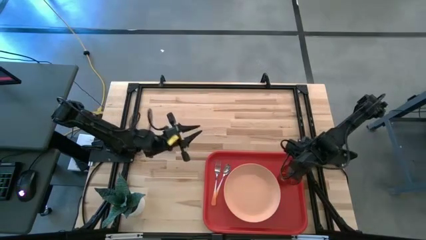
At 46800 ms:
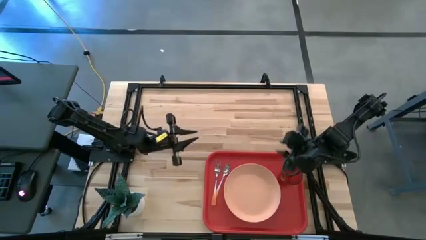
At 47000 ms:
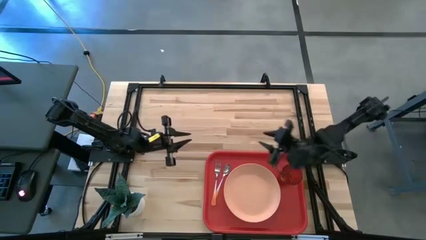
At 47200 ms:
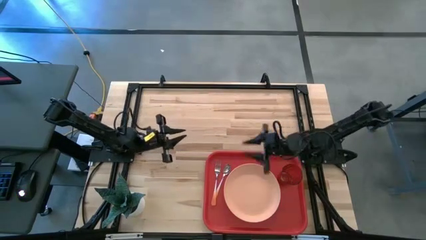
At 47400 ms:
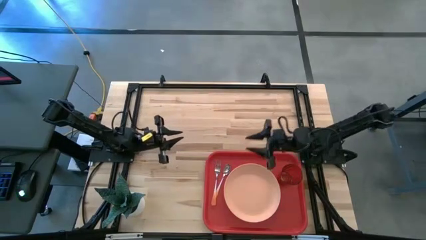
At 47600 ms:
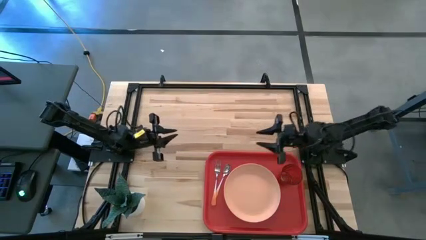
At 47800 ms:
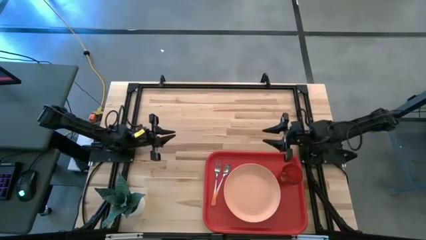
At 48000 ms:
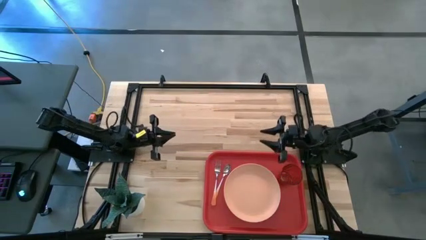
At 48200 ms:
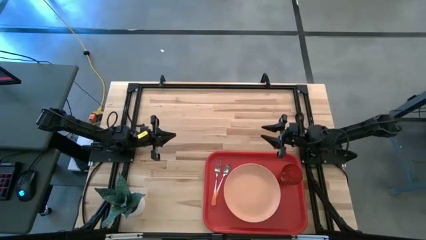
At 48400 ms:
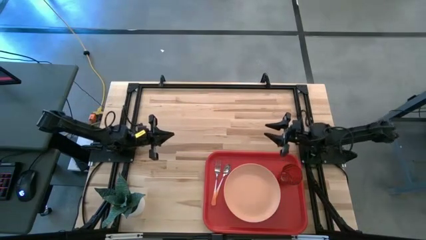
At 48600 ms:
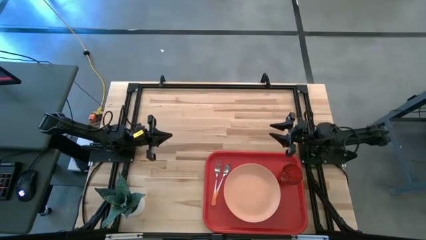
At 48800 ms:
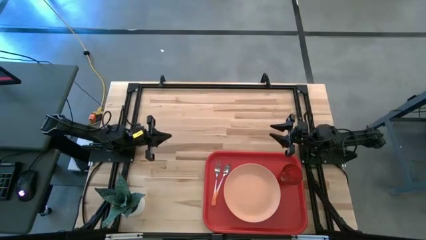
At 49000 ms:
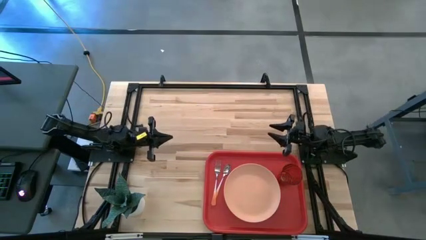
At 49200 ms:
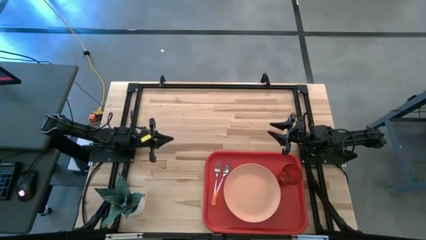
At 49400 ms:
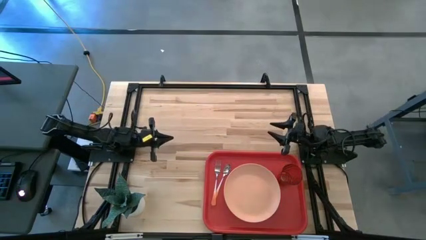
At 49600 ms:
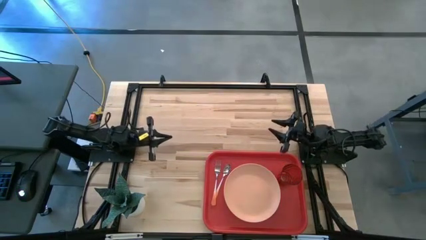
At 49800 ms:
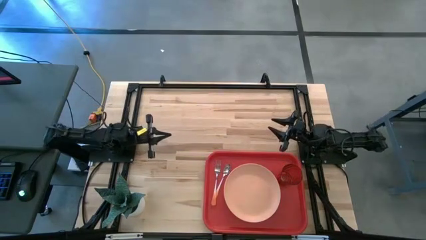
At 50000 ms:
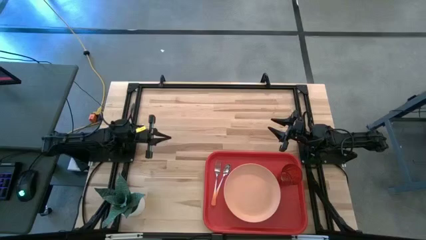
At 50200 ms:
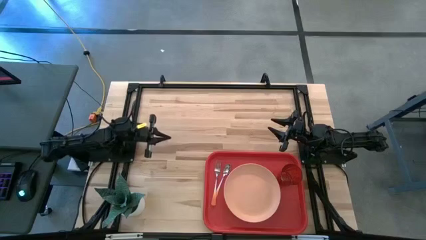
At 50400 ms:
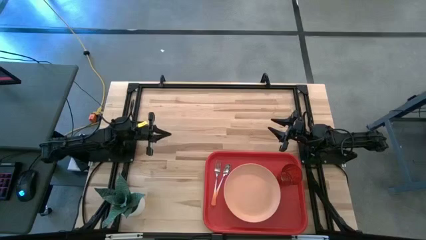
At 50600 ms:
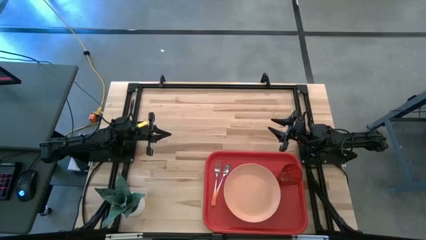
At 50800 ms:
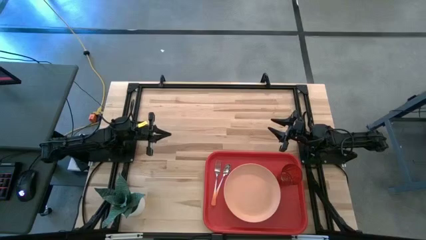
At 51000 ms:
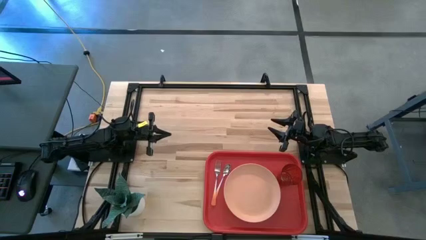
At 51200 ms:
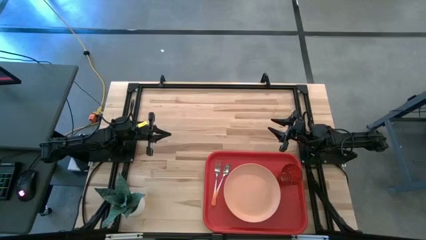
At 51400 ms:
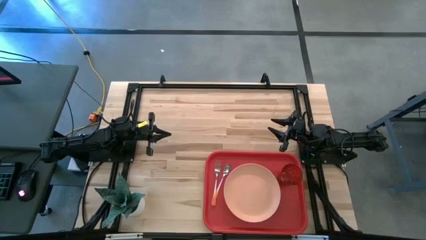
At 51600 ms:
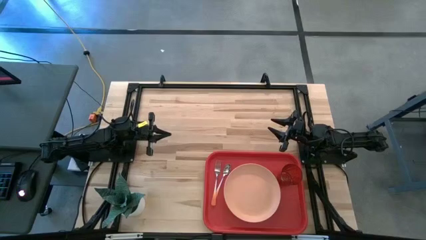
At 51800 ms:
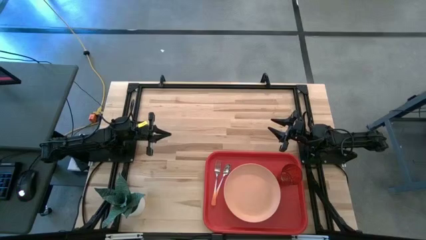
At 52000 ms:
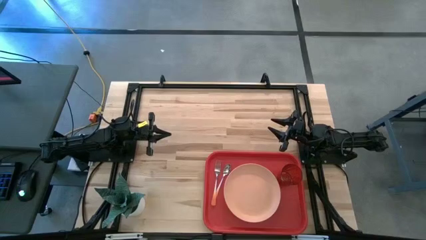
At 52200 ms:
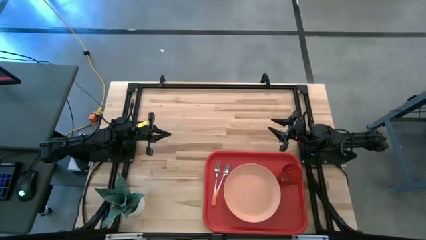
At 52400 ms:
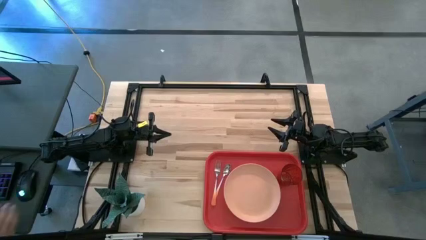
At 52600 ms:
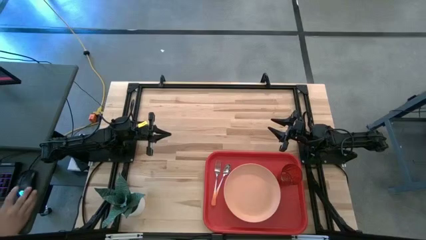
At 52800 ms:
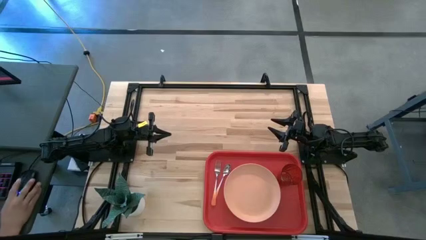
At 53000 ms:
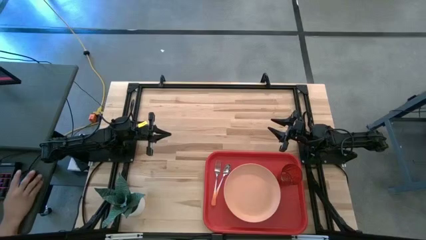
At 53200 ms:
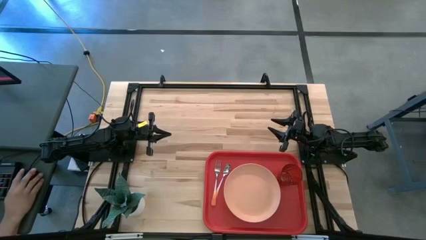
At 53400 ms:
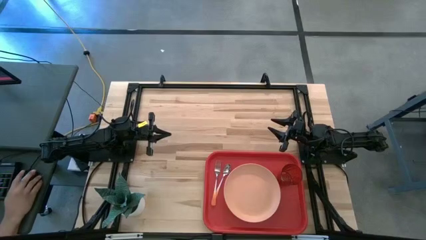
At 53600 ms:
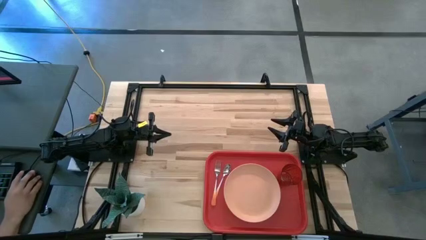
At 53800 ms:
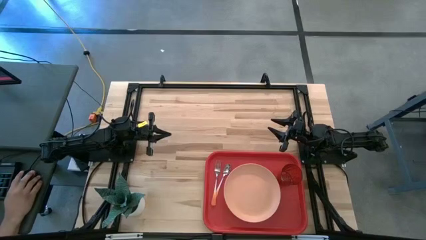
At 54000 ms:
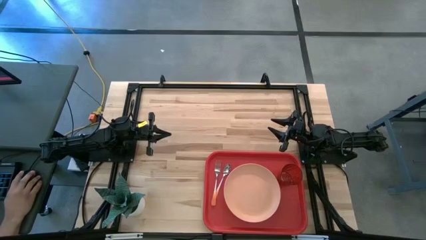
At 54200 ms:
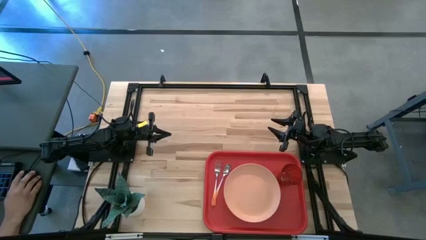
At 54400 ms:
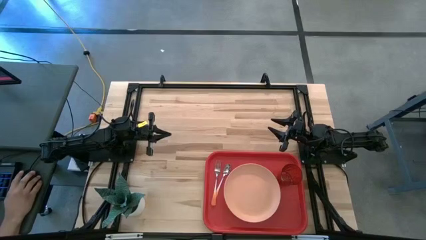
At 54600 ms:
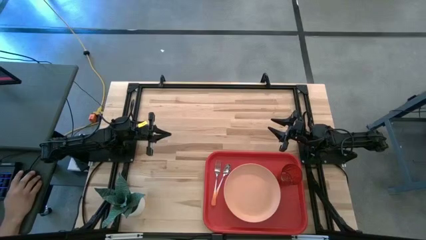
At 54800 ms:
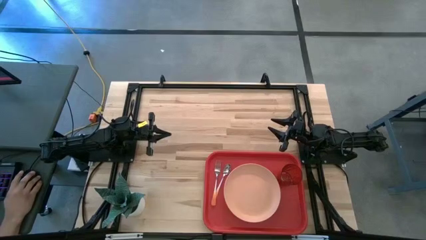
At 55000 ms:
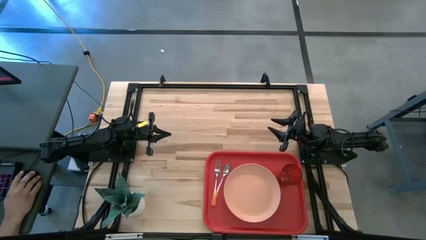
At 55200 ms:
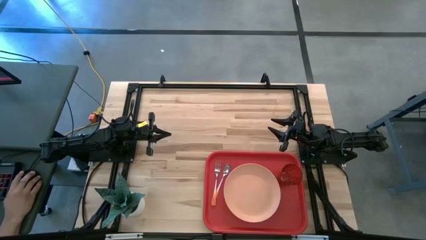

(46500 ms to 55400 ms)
Task: Pick and place plate/cup/fork/spoon on tray
Return to Home Position

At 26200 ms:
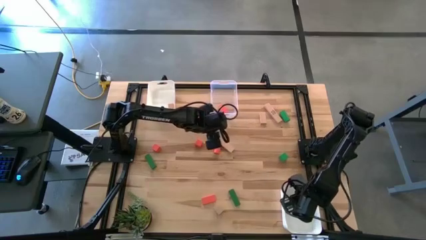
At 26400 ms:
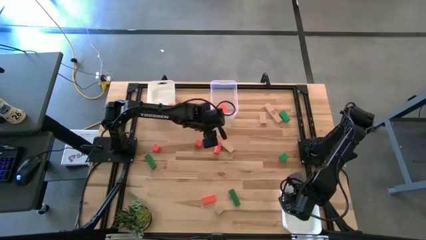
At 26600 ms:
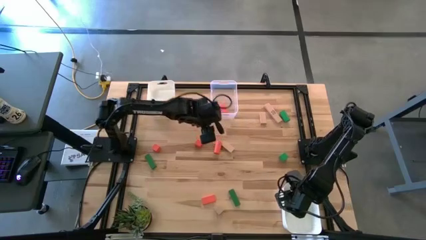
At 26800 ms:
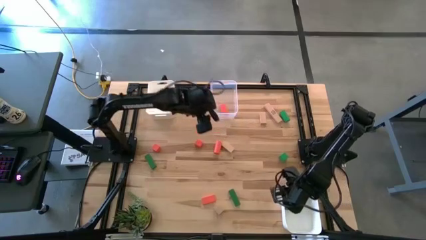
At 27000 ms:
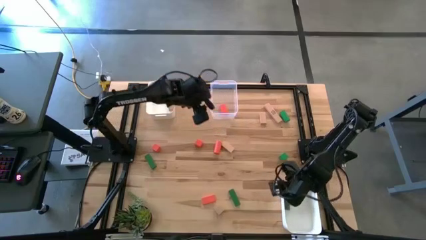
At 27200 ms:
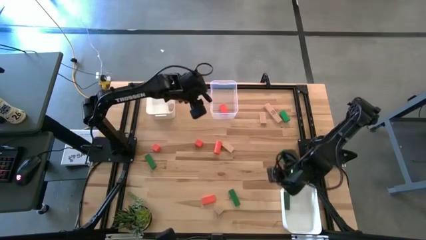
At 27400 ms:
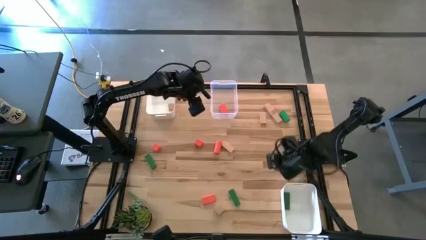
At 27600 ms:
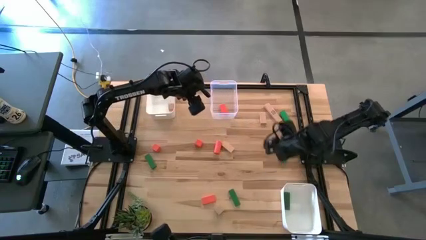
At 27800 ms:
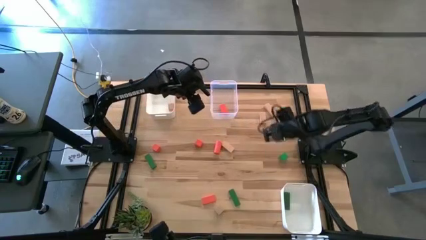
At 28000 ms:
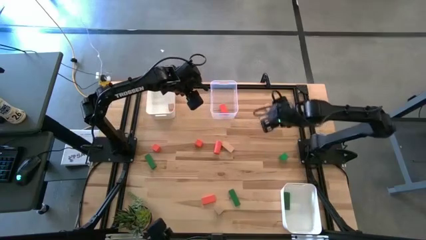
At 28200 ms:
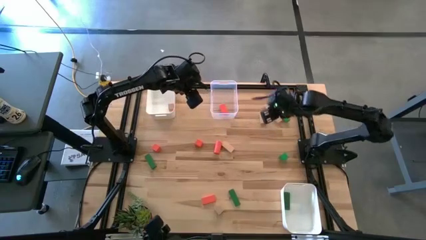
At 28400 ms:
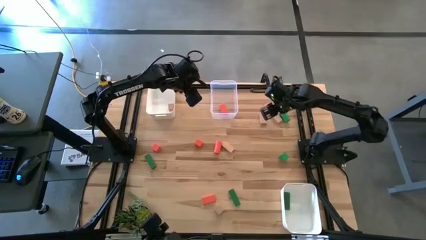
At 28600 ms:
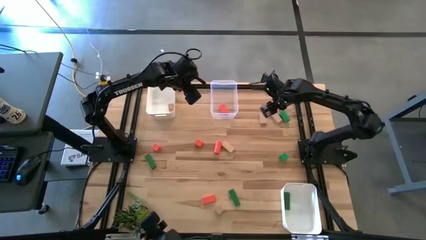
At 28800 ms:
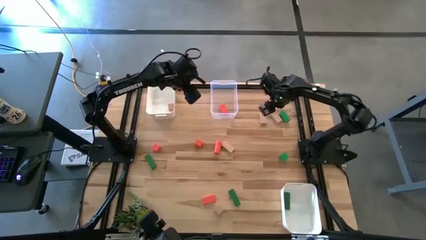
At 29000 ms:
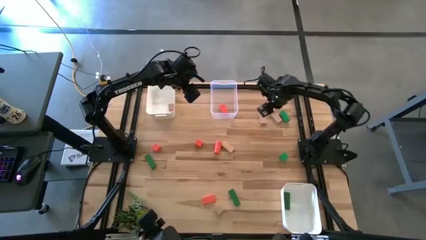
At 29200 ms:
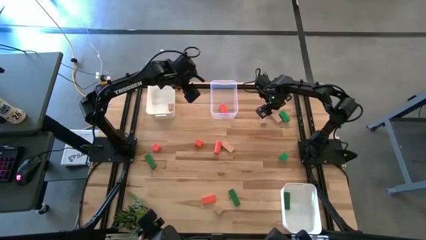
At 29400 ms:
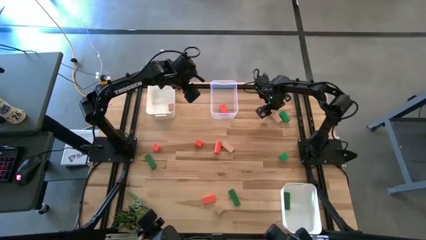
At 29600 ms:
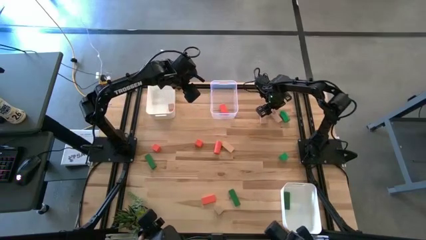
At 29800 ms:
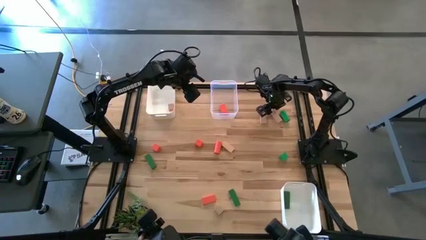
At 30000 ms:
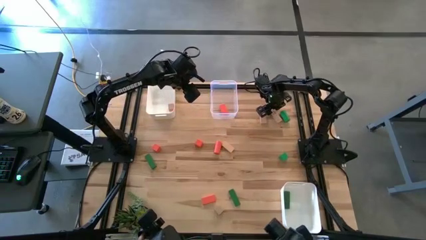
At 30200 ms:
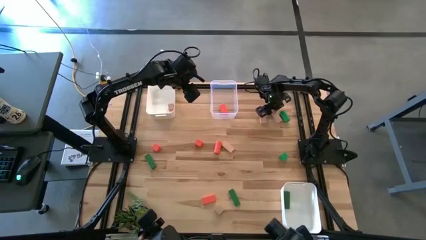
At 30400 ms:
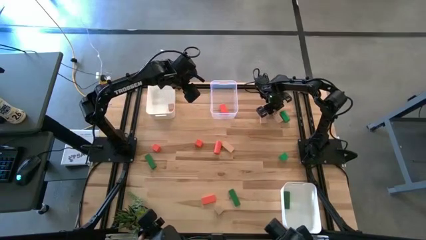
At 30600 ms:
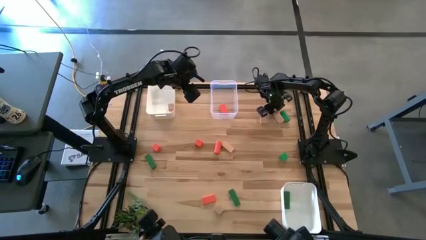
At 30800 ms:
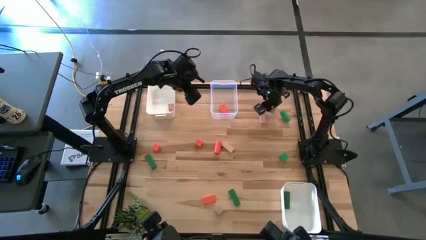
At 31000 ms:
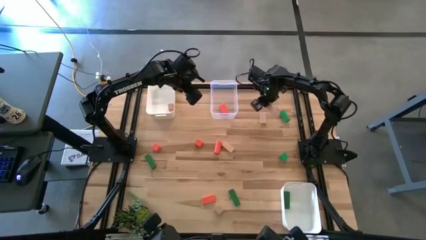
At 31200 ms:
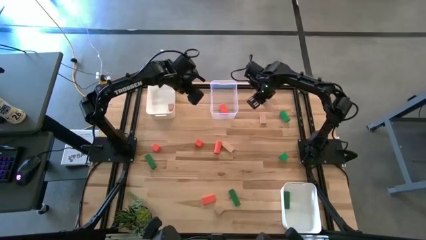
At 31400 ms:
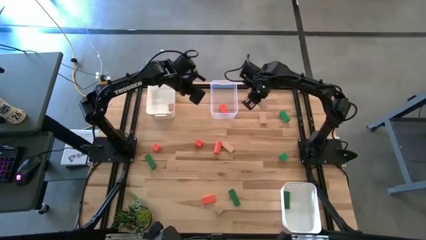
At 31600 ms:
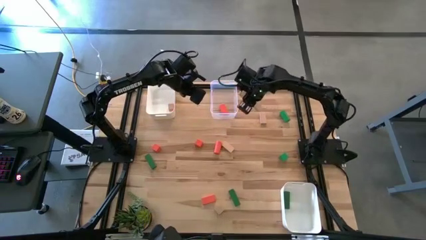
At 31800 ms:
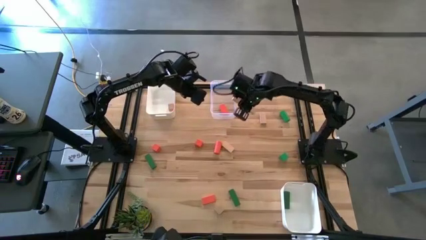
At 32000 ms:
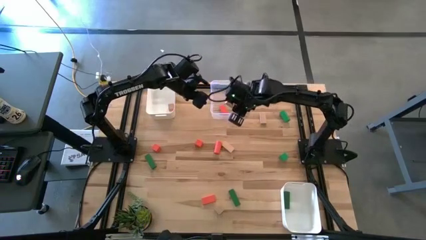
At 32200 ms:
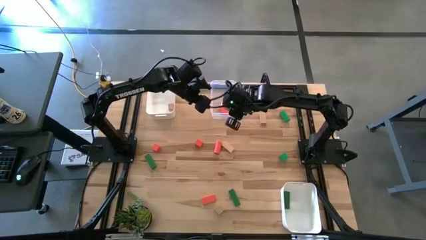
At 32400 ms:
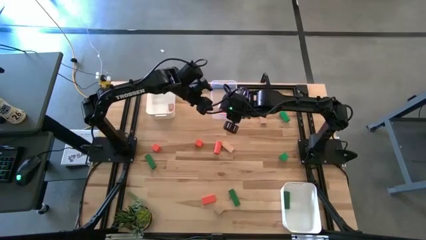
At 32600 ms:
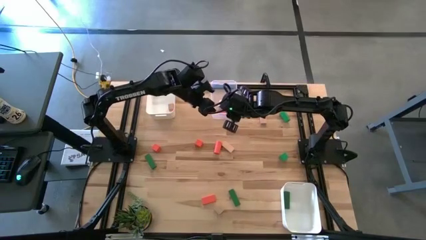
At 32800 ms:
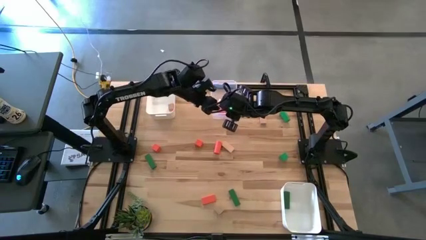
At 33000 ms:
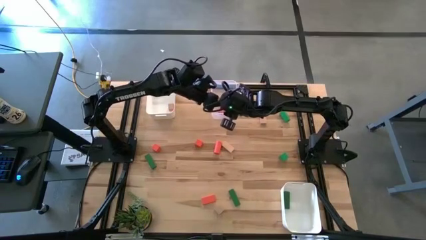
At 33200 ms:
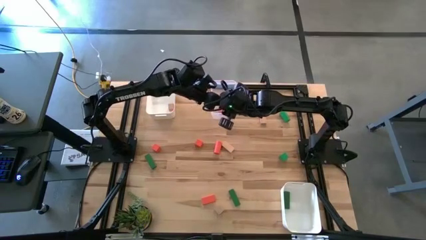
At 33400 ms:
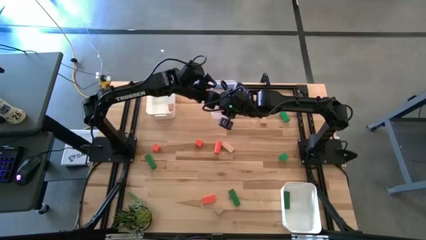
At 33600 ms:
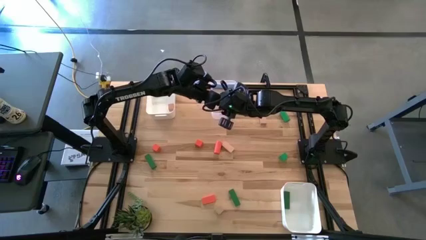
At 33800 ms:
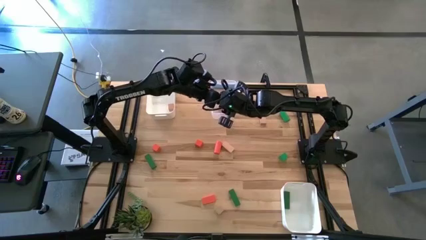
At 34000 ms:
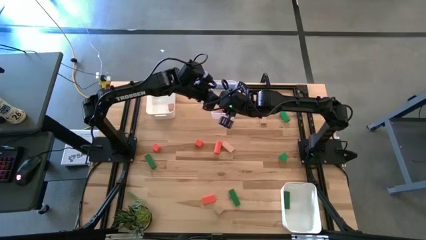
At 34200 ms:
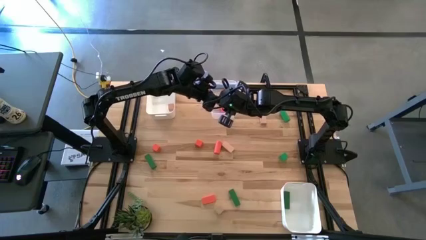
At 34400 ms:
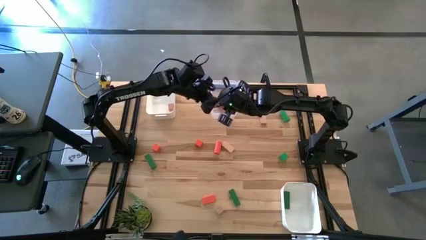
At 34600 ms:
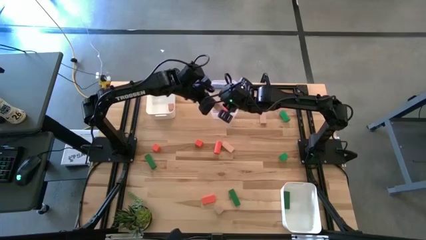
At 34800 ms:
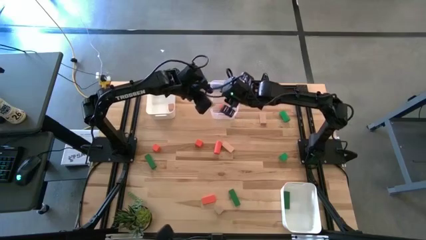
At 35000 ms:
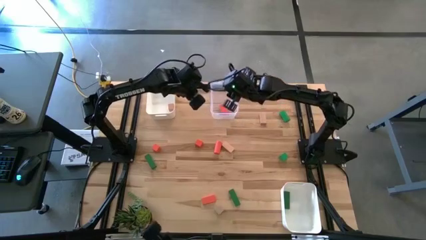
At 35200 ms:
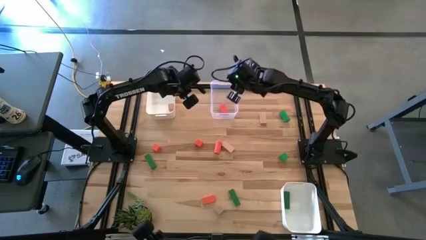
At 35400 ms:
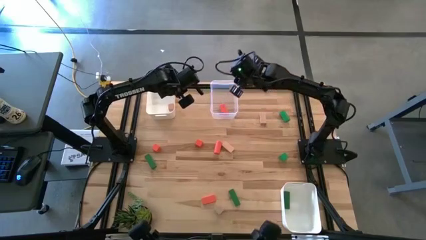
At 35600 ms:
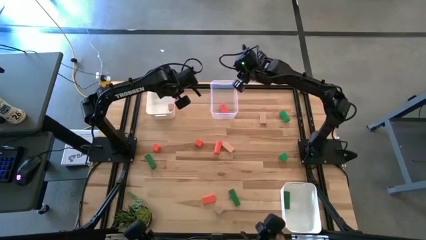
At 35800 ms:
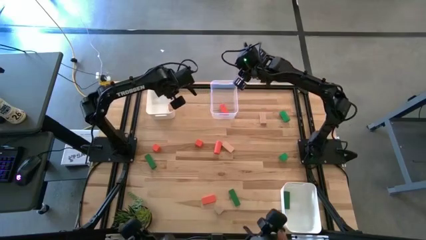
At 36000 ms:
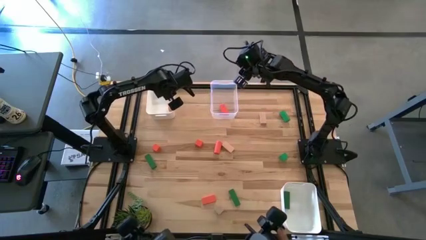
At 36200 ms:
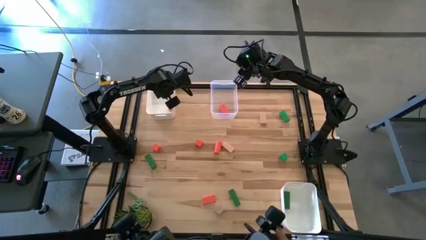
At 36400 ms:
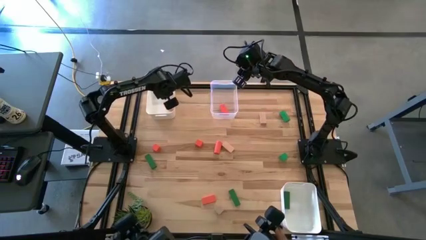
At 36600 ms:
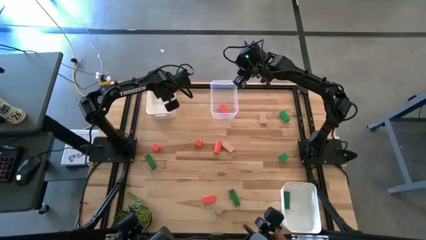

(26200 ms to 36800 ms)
Task: Sort & place blocks by color
Put the brown into the top white bin
